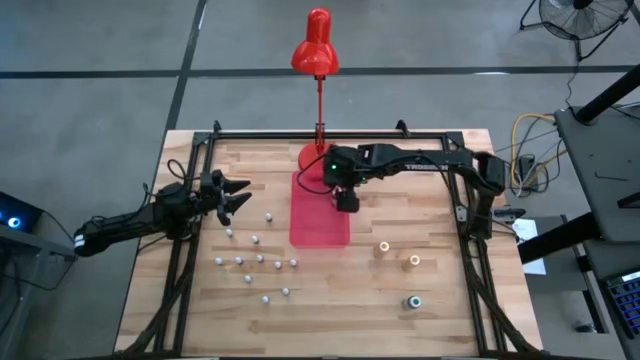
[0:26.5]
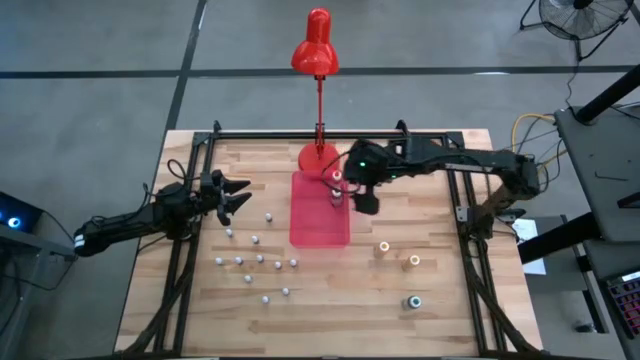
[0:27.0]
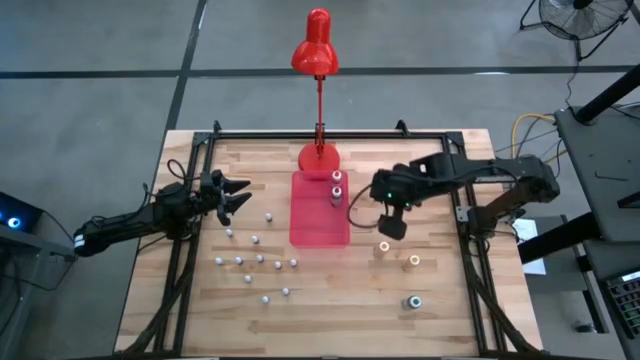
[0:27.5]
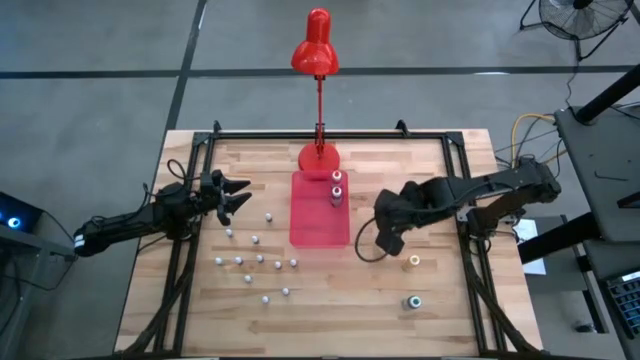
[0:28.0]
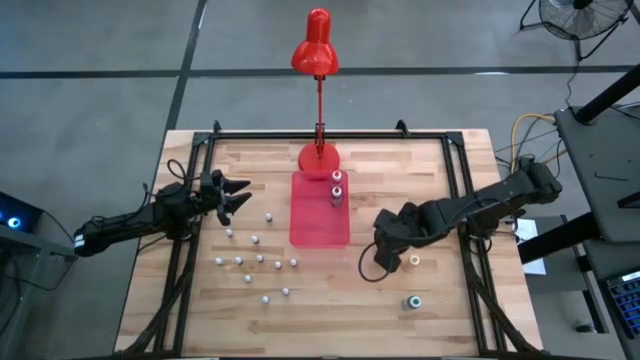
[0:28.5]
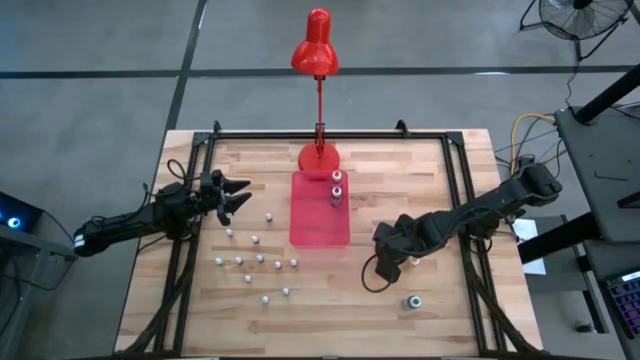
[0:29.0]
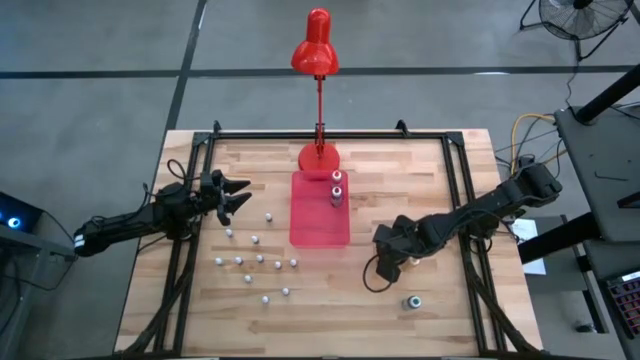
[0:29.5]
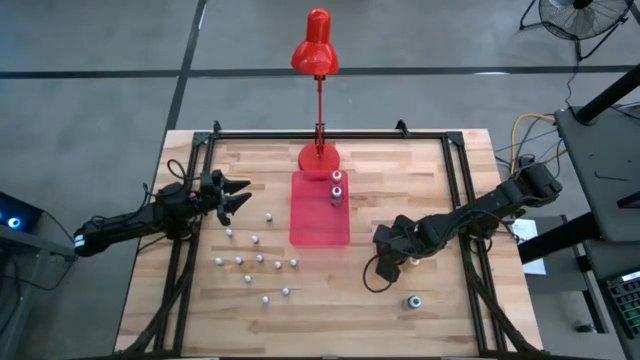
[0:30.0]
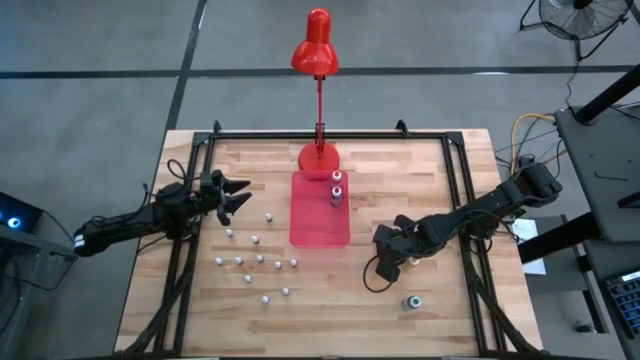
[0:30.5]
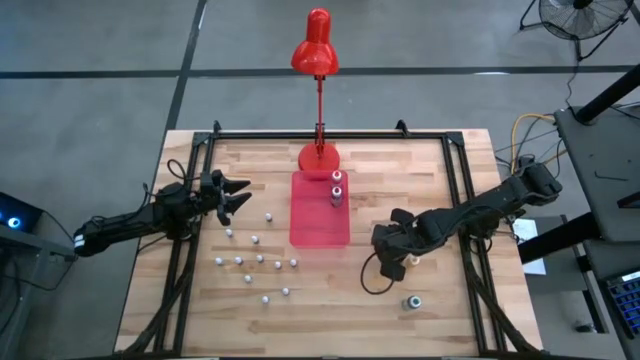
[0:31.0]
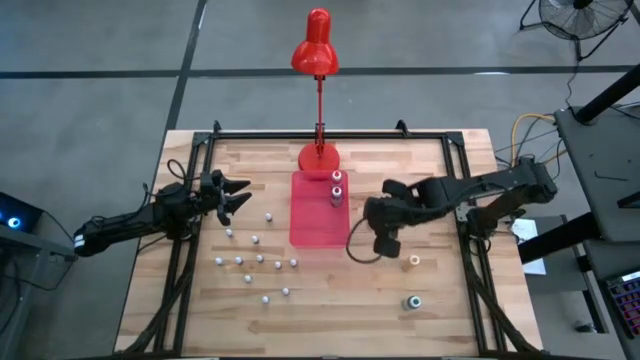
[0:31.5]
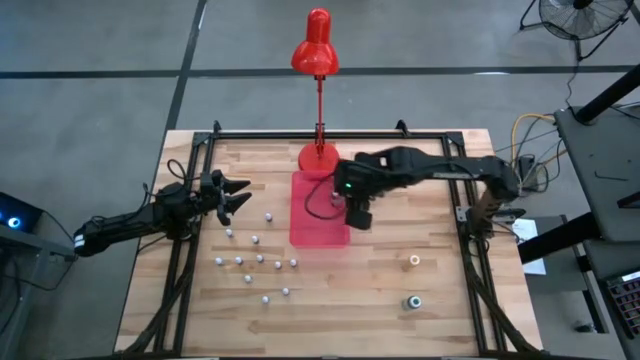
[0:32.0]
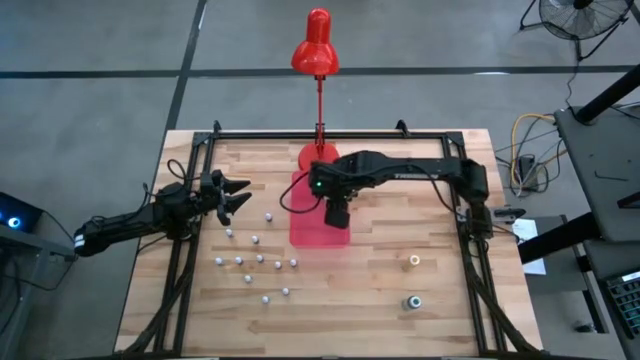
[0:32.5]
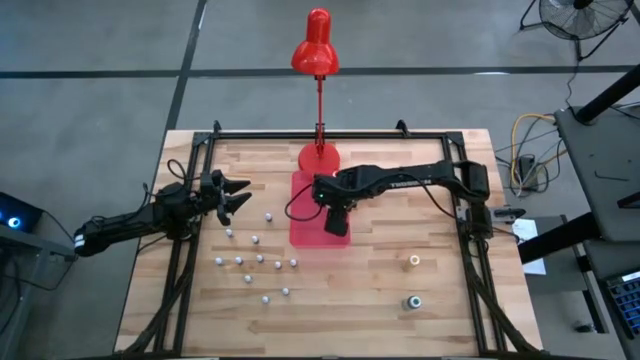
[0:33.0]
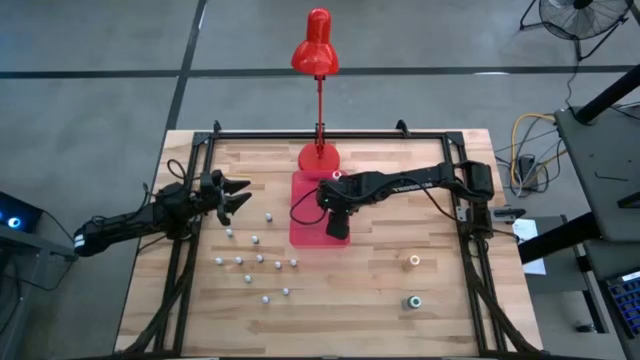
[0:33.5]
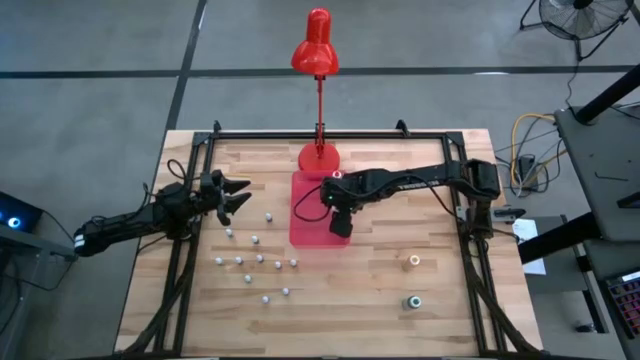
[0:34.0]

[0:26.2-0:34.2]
Task: Pick & Place food coloring
Put the big yellow food coloring bottle into the pink bin

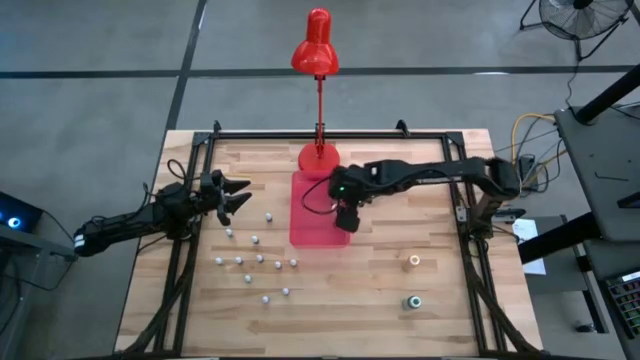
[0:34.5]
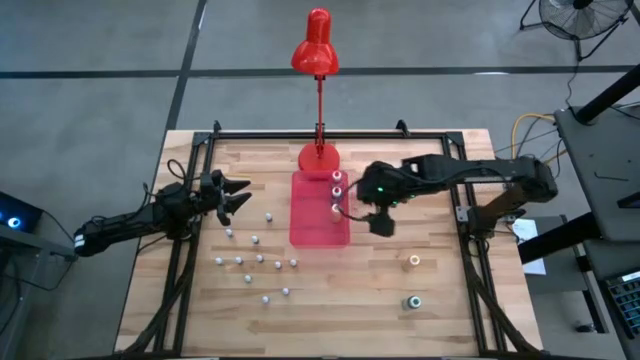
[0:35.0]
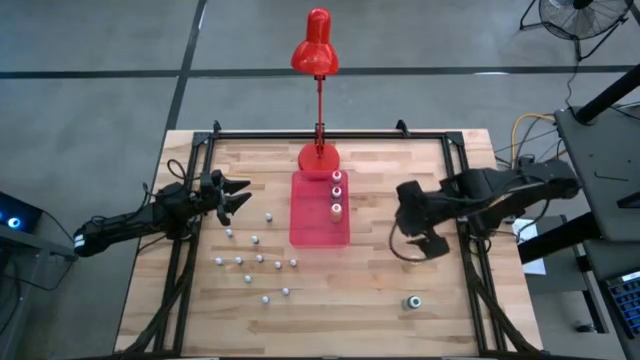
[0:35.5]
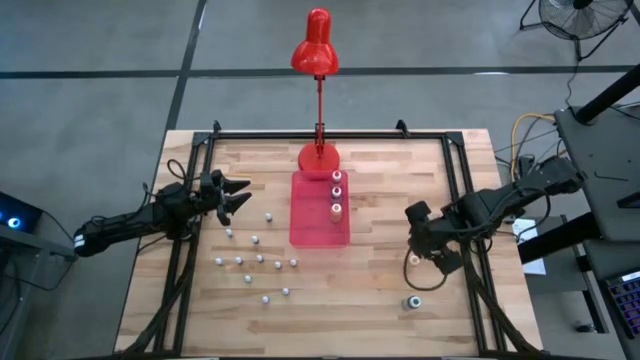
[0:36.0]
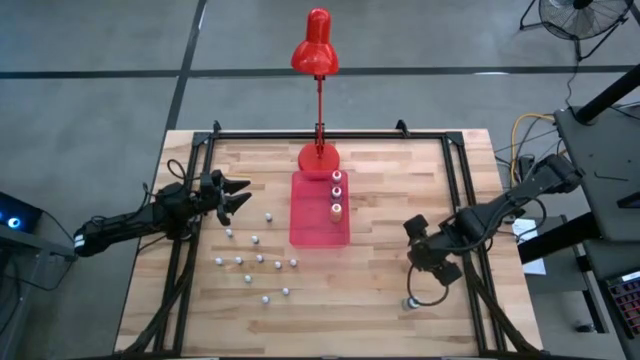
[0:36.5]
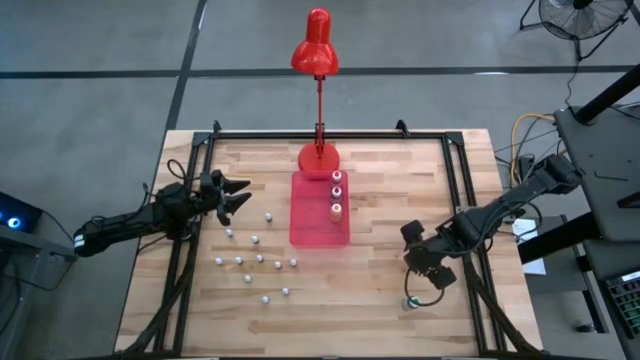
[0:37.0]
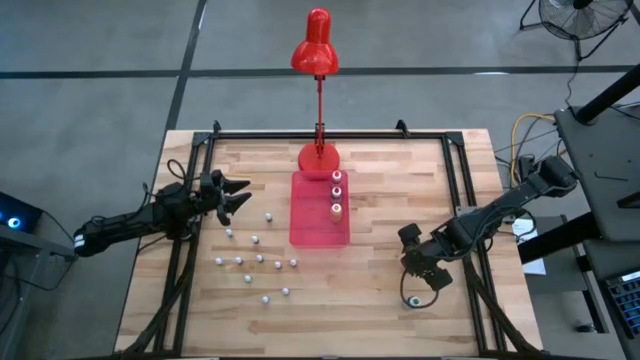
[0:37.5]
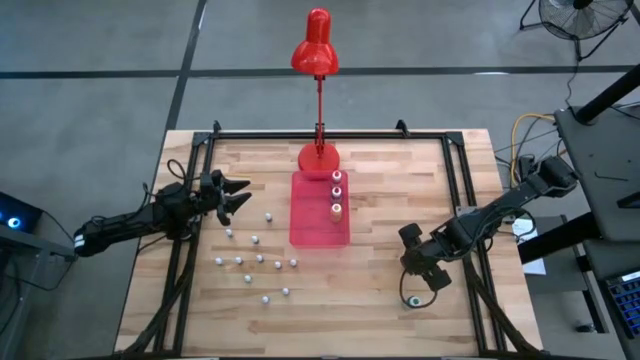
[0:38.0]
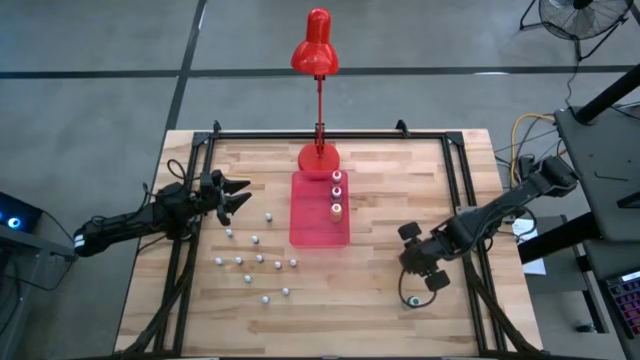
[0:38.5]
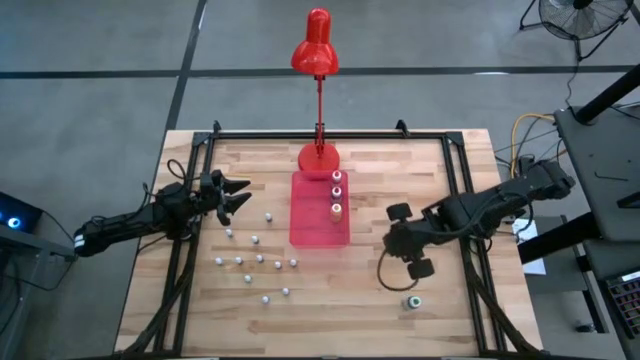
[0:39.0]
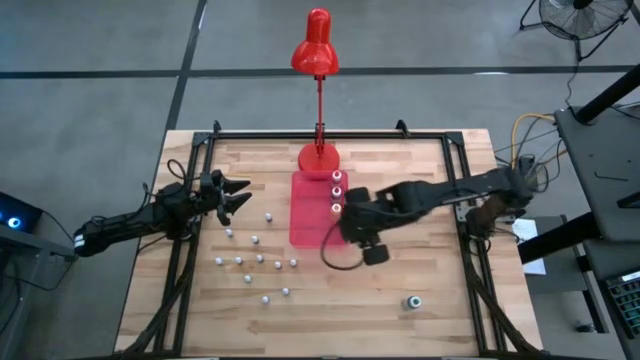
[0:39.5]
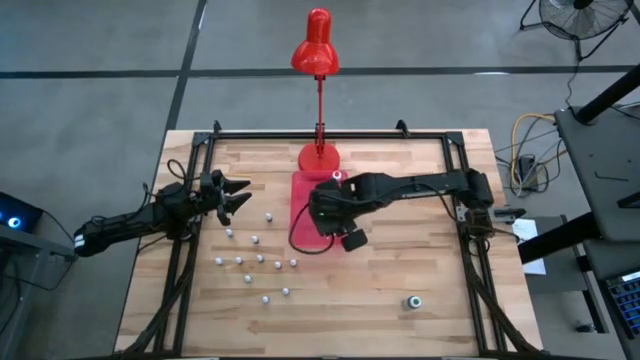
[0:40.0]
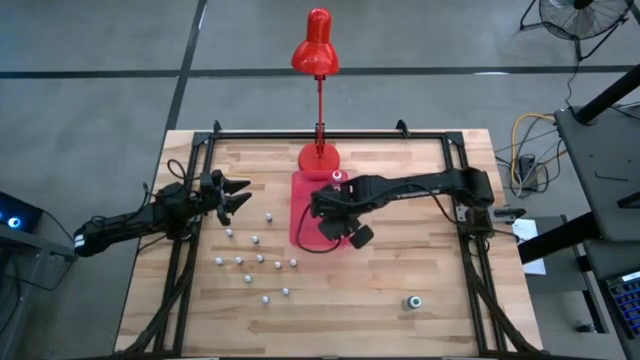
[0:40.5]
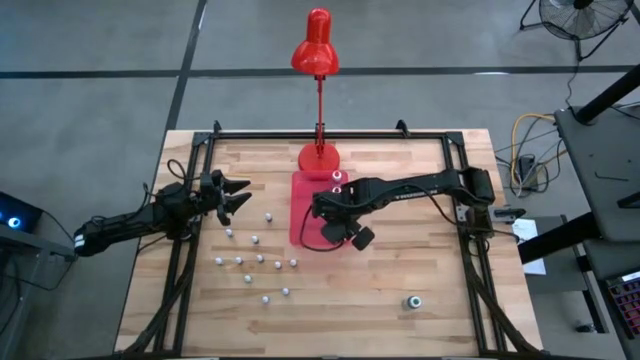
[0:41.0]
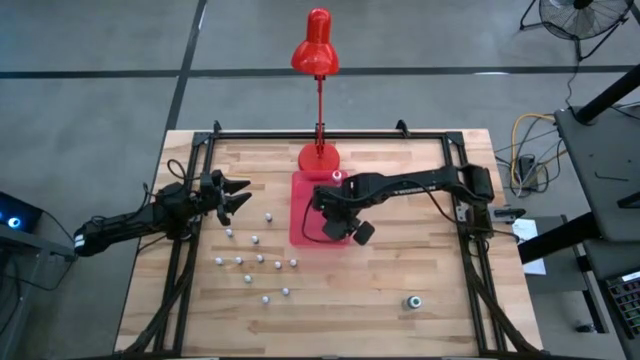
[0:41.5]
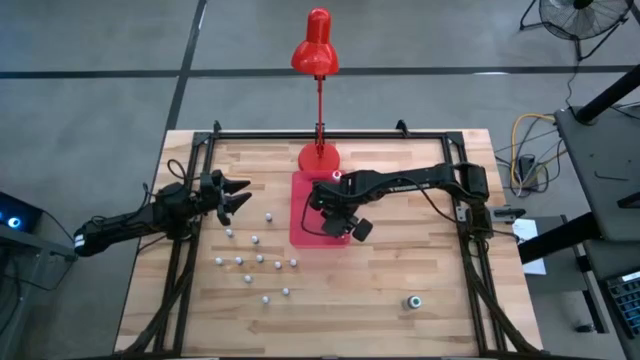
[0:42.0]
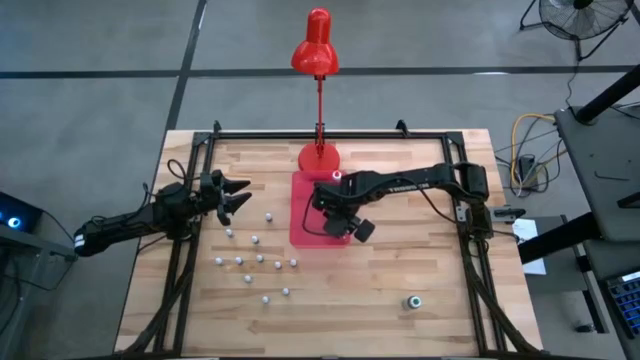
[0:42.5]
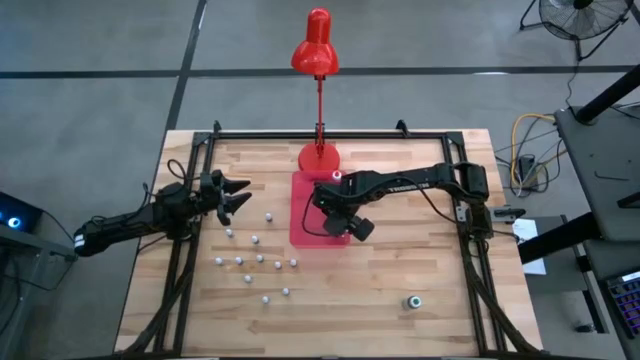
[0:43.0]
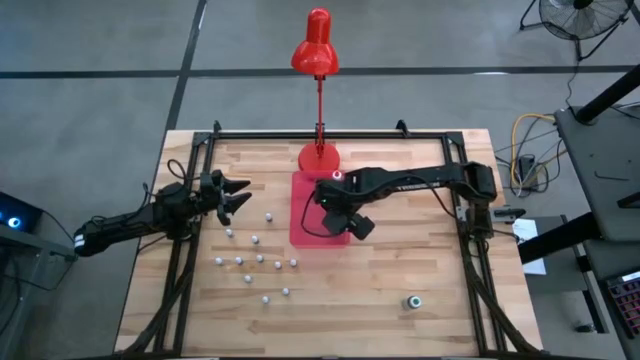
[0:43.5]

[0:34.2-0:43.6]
Put the big yellow food coloring bottle into the pink bin

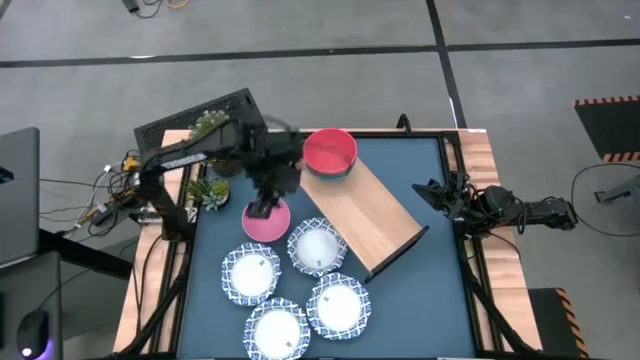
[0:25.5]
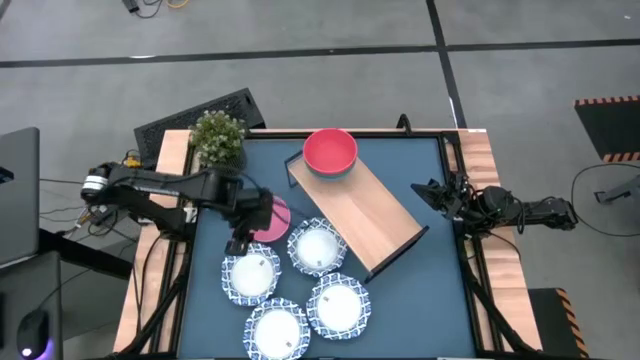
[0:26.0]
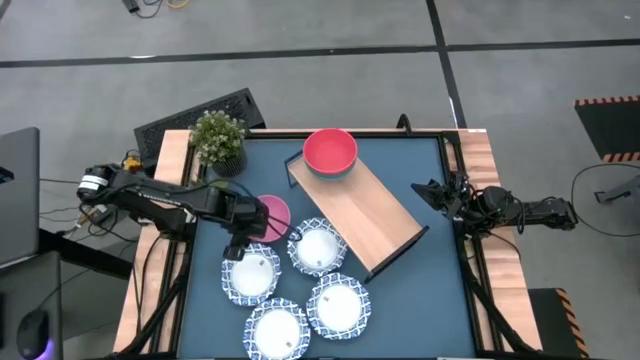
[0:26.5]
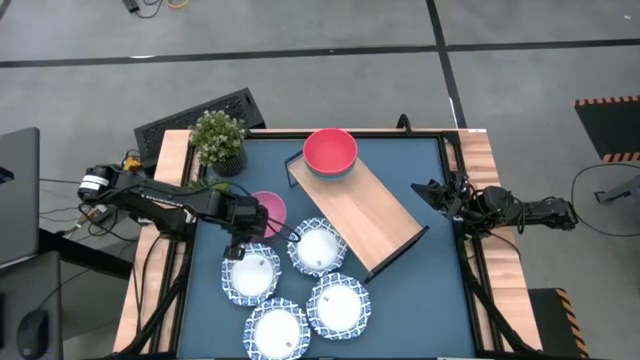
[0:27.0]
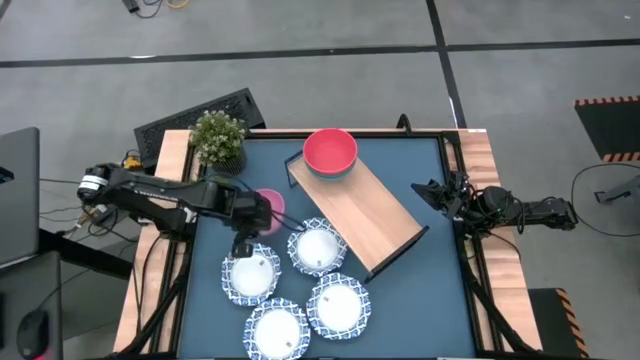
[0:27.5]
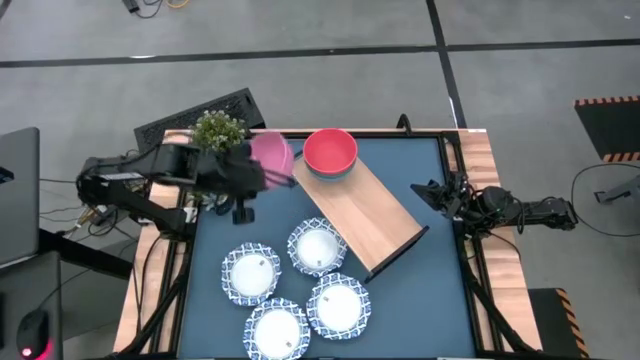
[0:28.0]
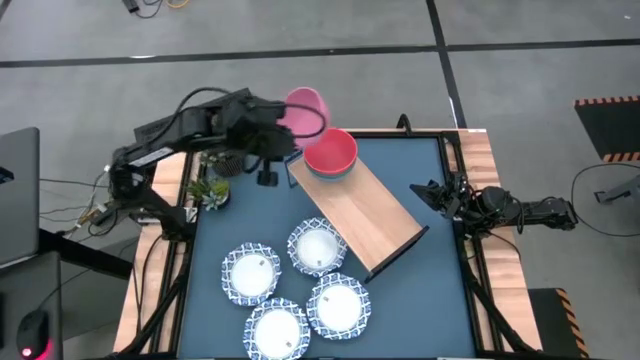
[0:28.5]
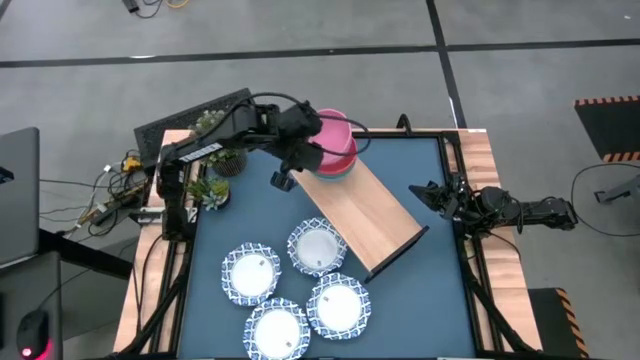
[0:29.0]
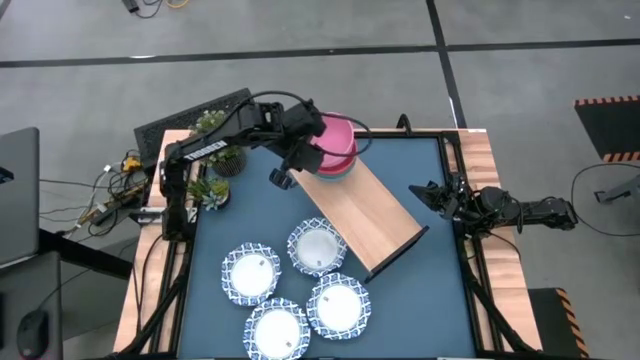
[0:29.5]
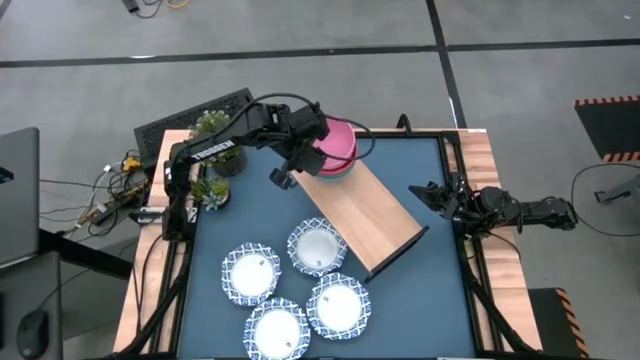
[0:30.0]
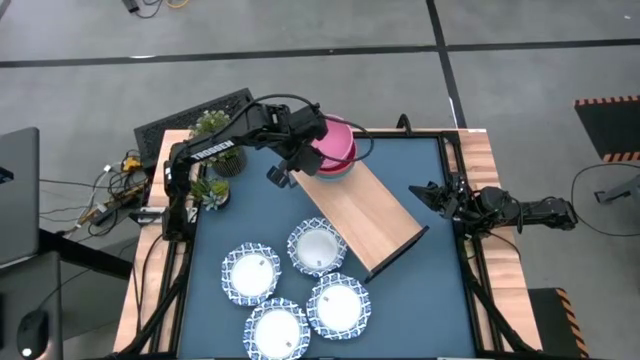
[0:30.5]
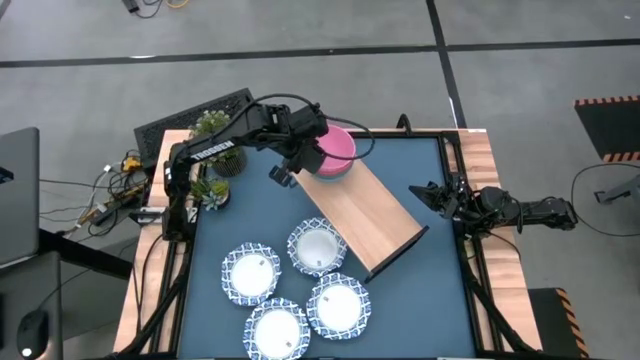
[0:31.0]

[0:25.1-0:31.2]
Task: Place and stack plates onto a shelf
Stack the pink bowl on top of the red bowl on the shelf
